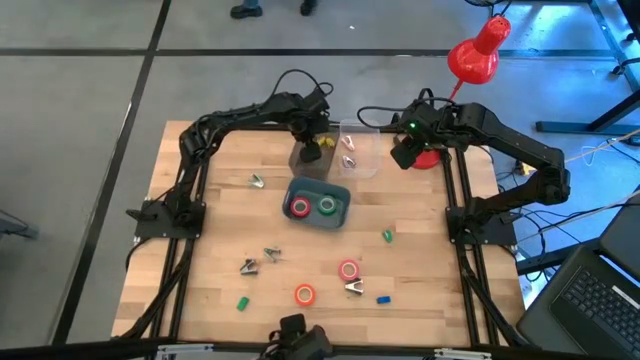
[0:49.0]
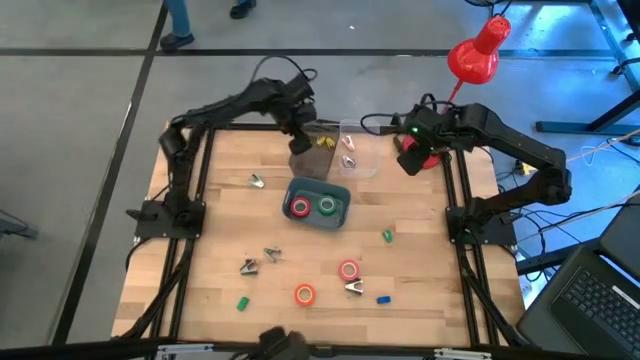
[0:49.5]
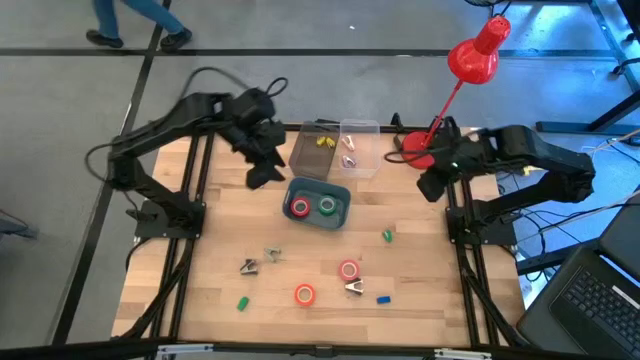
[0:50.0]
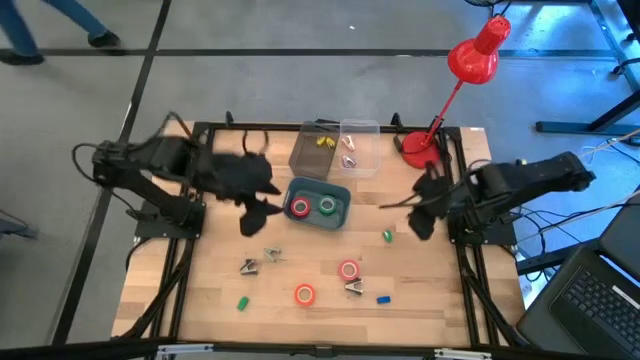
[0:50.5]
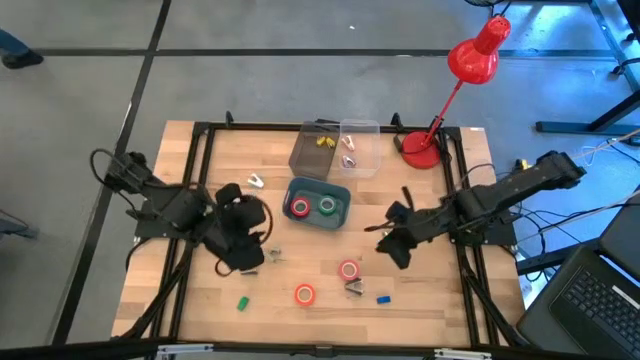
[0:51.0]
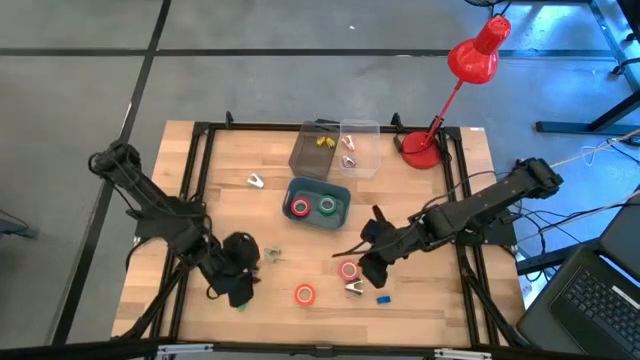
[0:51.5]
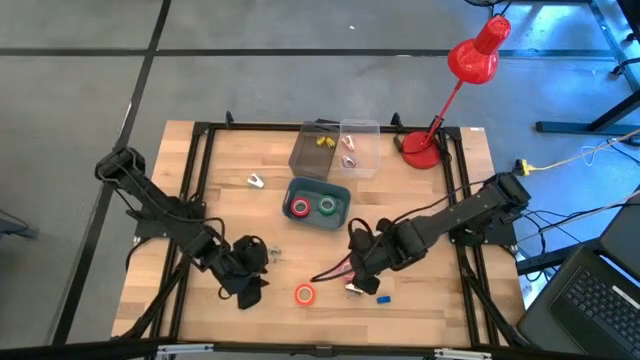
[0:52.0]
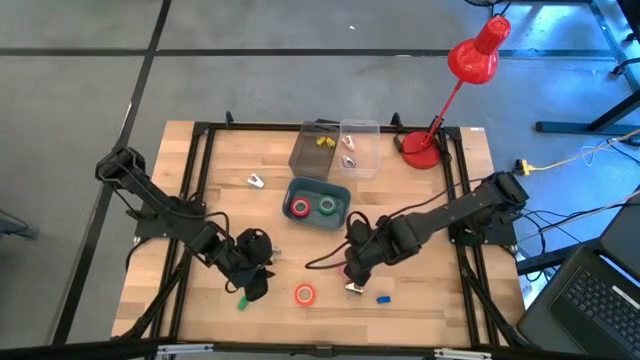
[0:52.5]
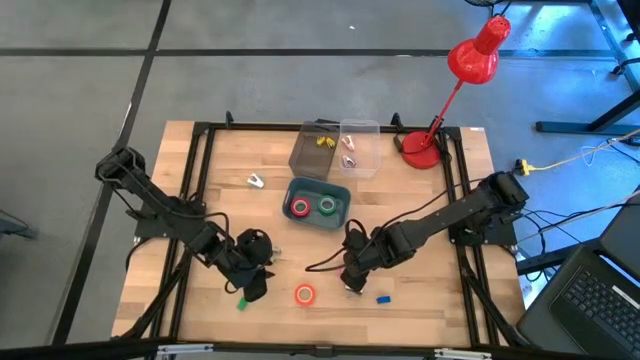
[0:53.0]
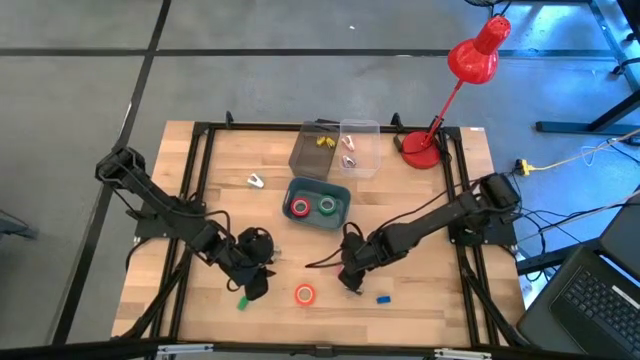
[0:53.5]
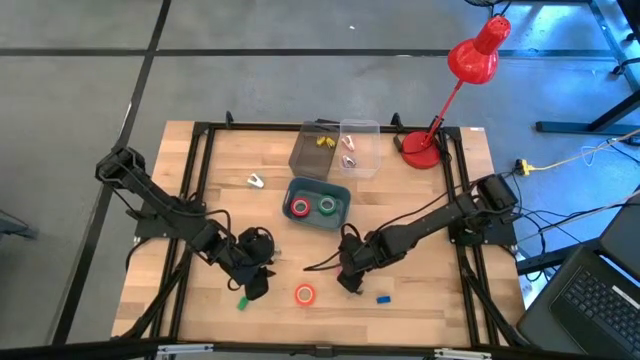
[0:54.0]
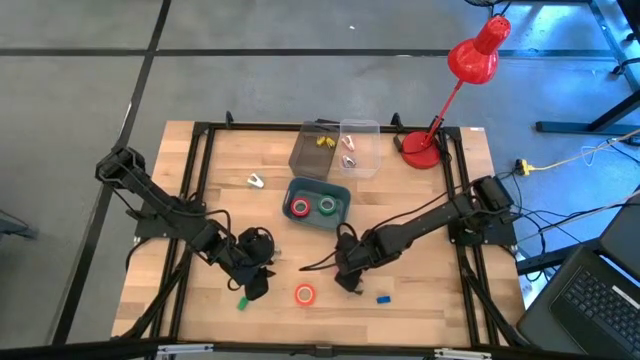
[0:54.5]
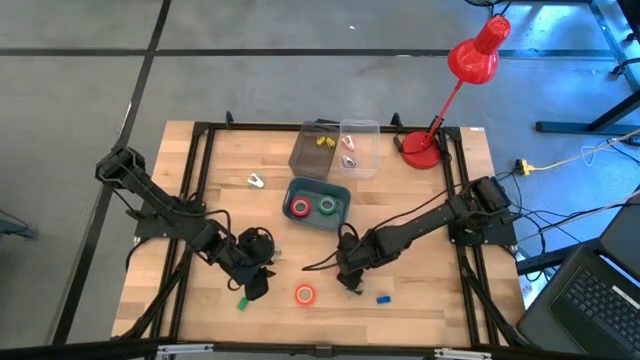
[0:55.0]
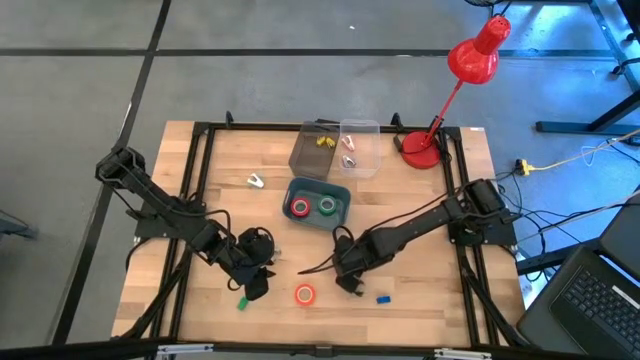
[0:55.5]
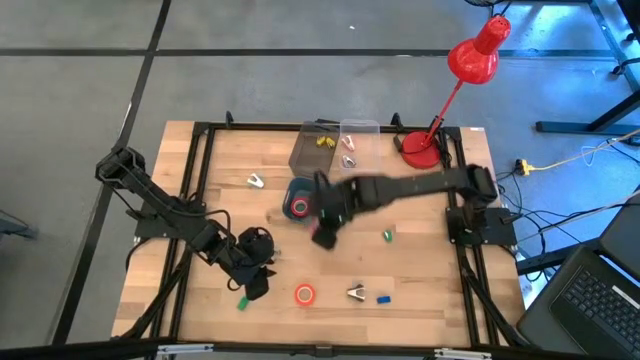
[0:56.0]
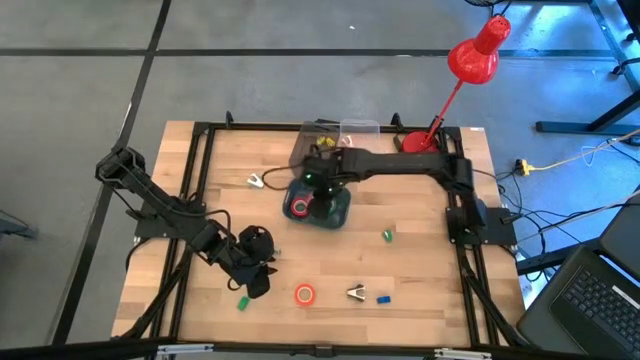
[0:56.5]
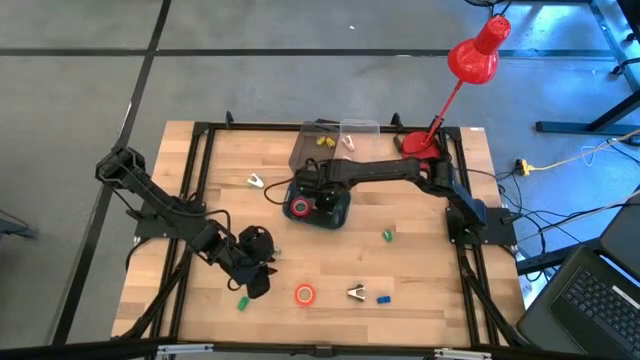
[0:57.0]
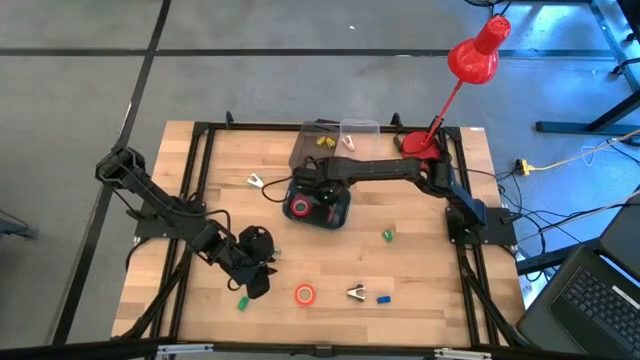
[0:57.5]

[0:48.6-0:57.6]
Task: Pick and place Stapler, Stapler remover, tape
Put the pink tape into the blue bin

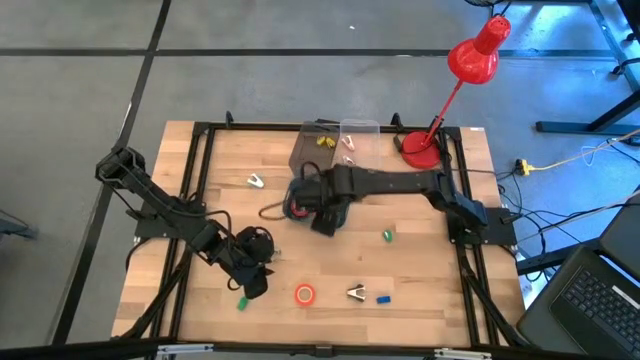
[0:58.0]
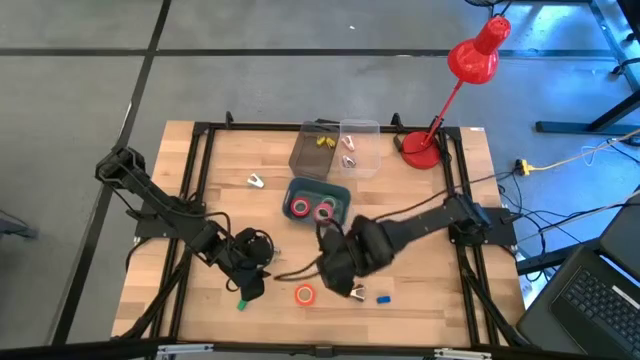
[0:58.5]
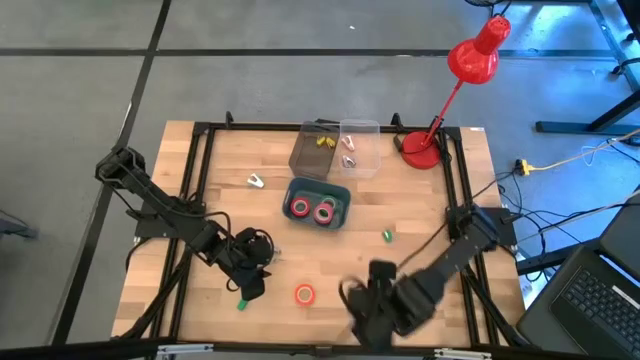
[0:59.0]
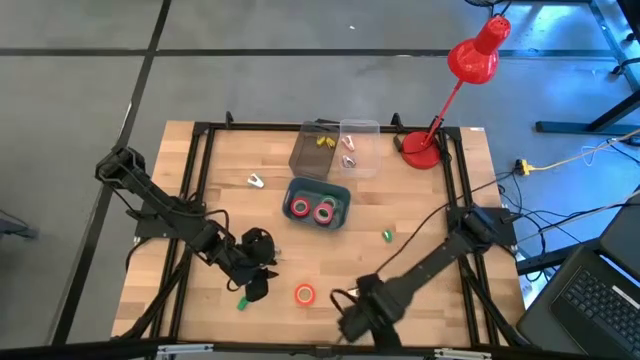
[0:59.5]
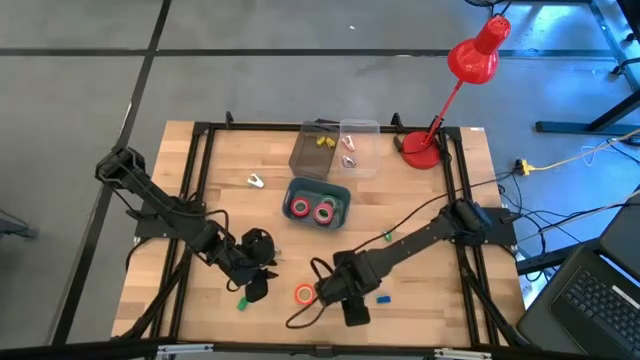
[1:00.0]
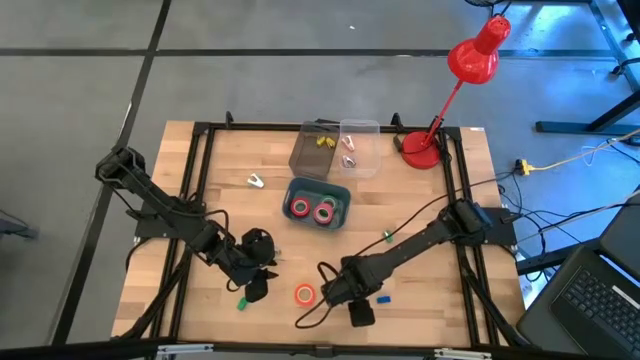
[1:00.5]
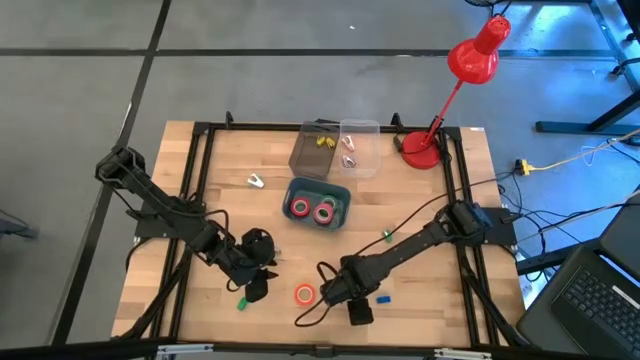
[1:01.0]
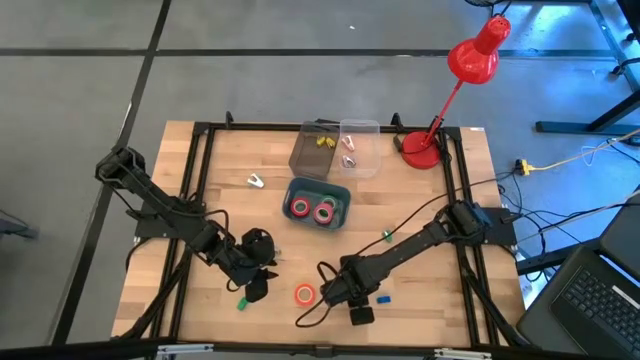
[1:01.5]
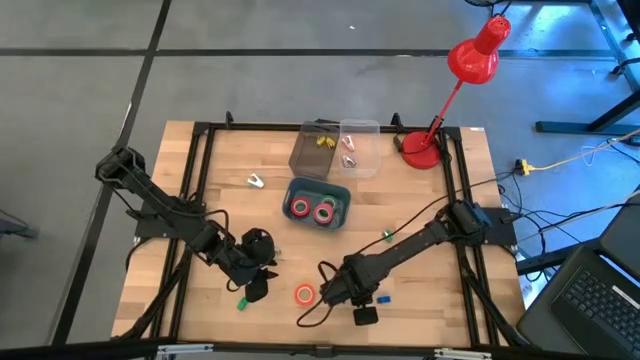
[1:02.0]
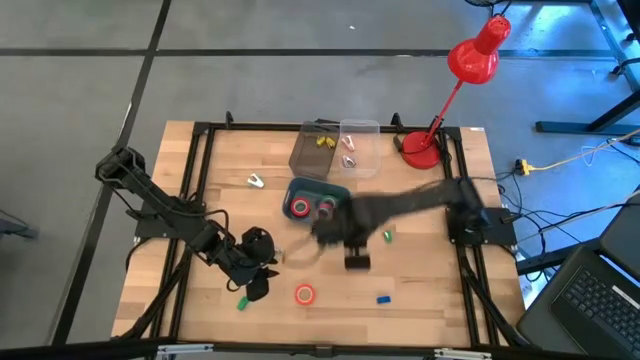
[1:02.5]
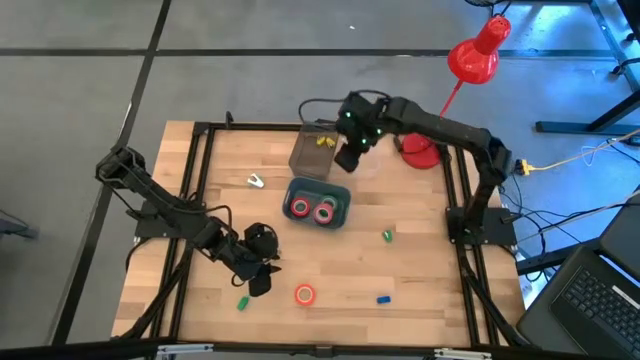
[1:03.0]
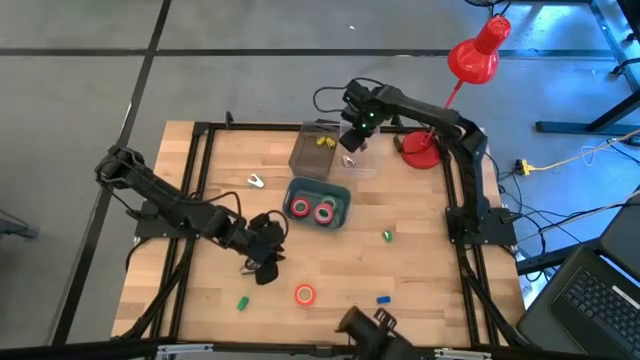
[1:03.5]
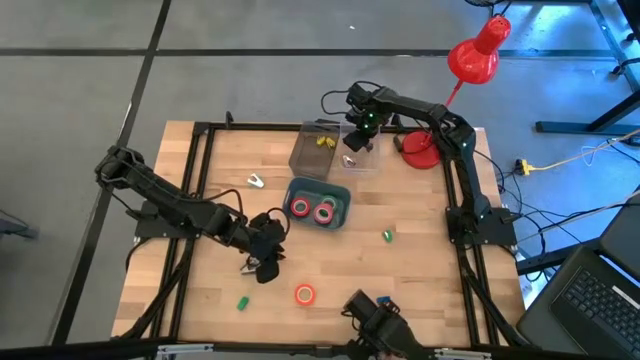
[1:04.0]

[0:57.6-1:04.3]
Put the right black staple remover into the white bin

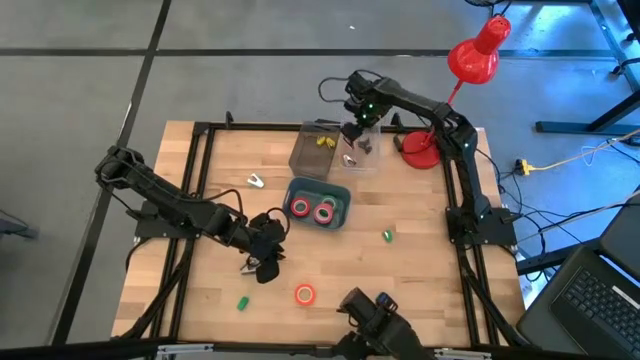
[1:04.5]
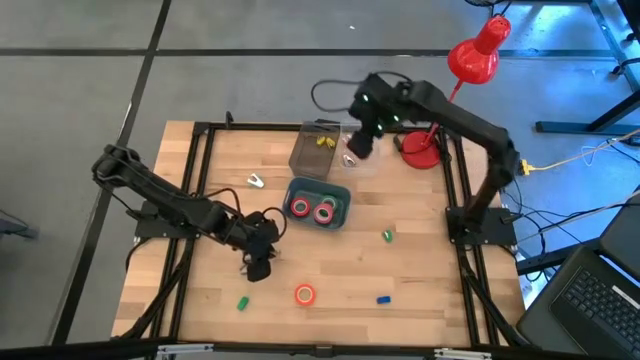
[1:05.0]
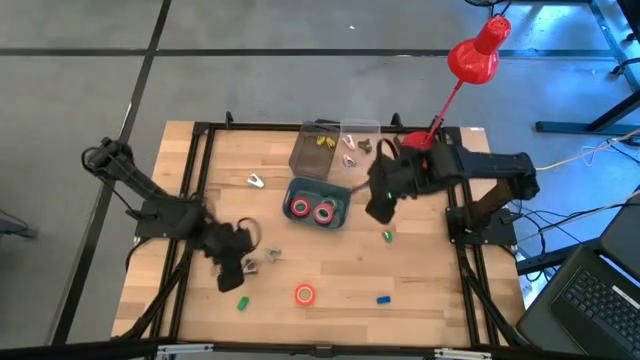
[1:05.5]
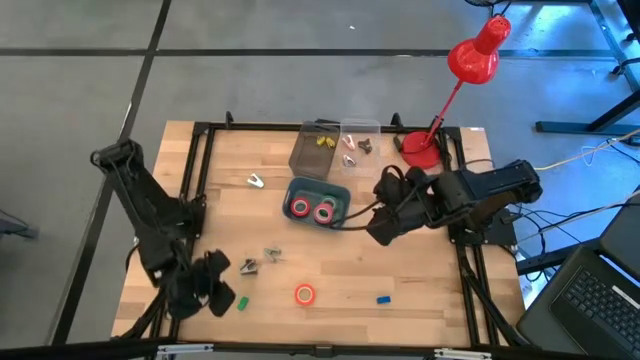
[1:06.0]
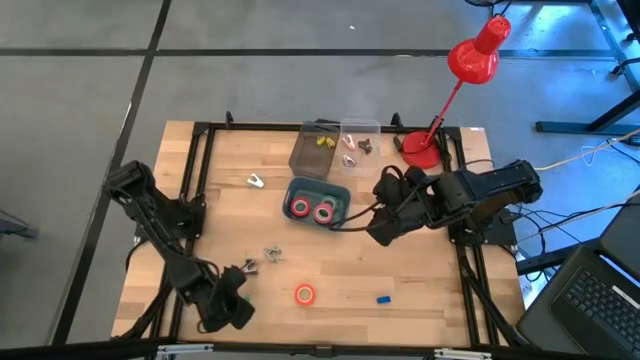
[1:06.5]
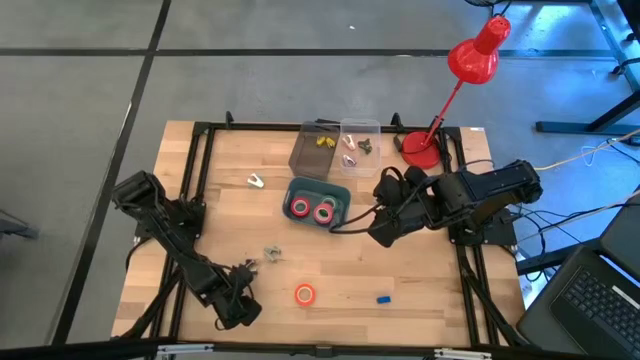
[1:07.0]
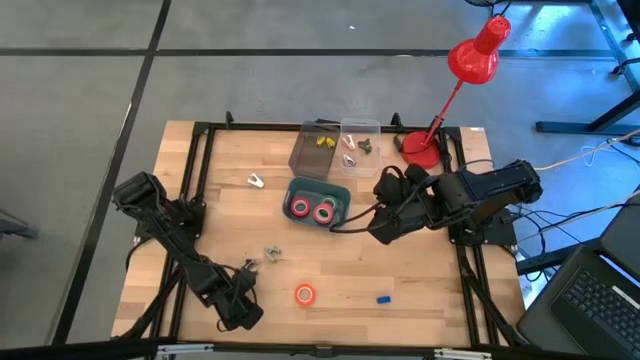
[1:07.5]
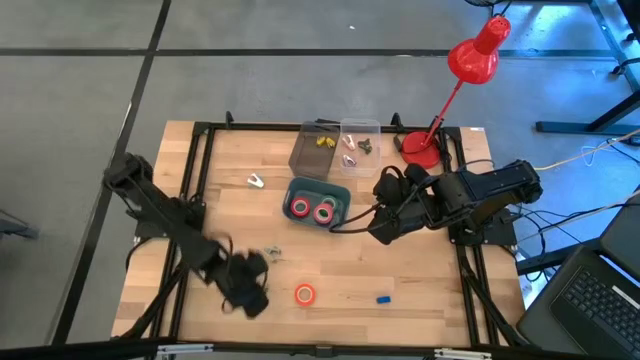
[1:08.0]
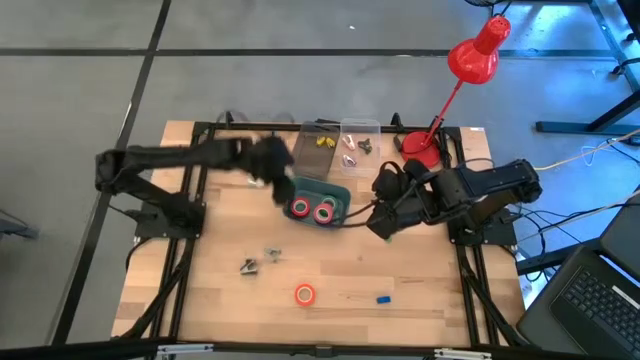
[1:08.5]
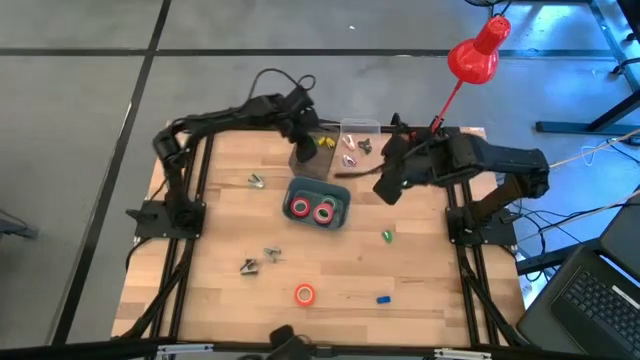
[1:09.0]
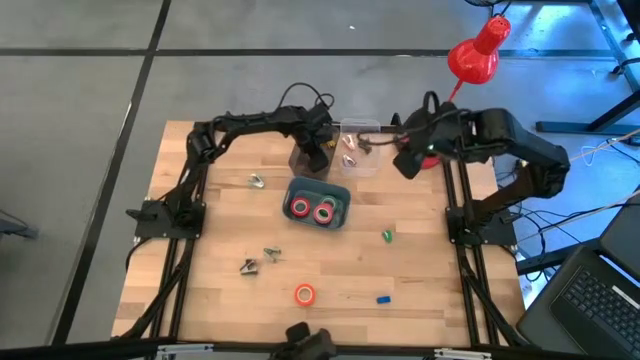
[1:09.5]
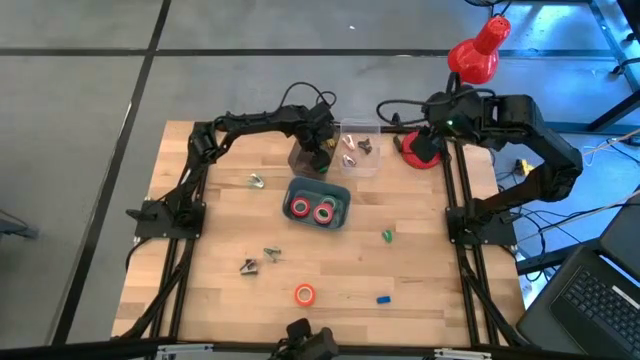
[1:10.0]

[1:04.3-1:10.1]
Put the bottom green stapler into the black bin

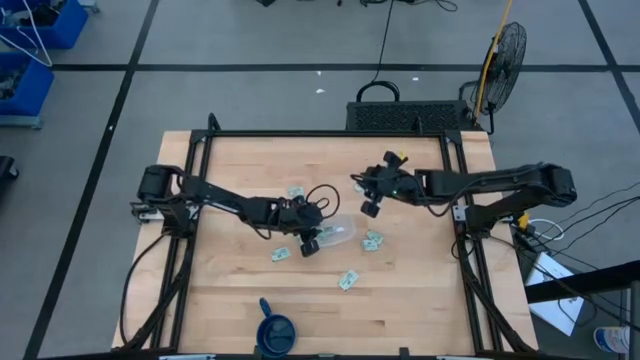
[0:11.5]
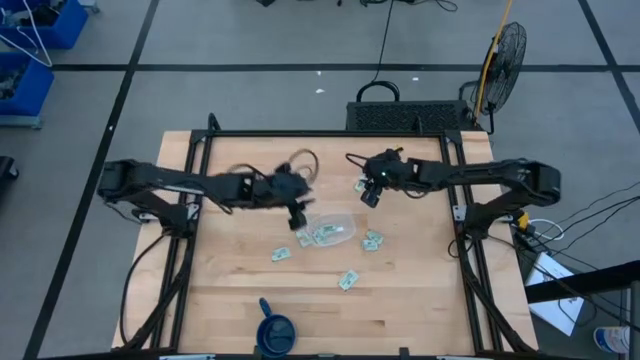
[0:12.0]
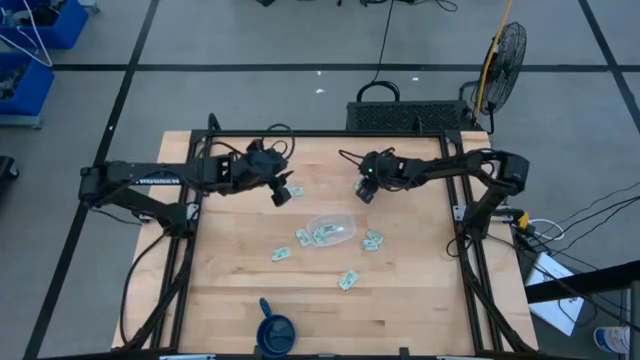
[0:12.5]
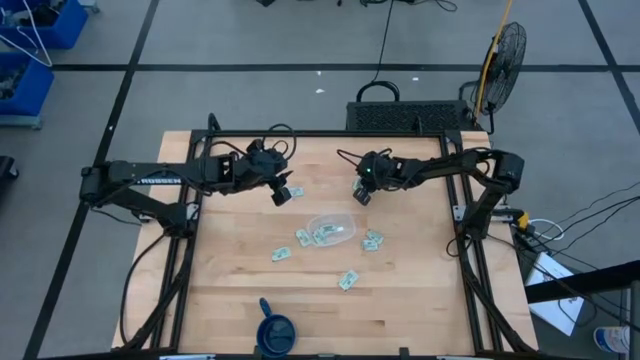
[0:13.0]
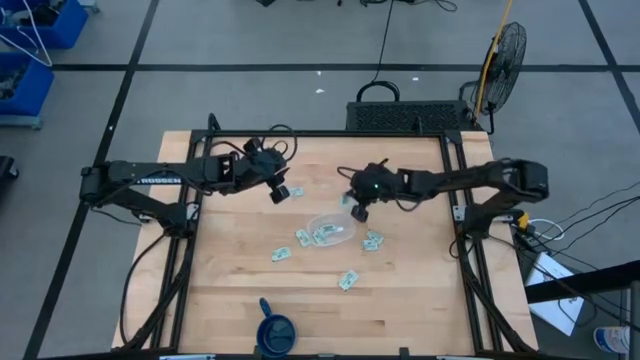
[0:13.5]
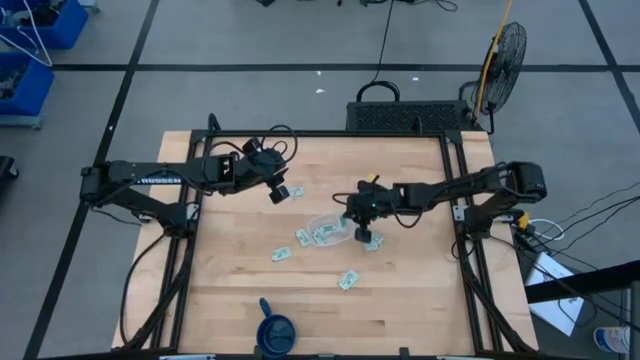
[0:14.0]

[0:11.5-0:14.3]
Task: Pick and place Stevia / Truvia into bins
Put the stevia packet into the transparent container
